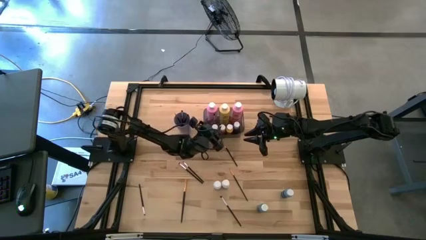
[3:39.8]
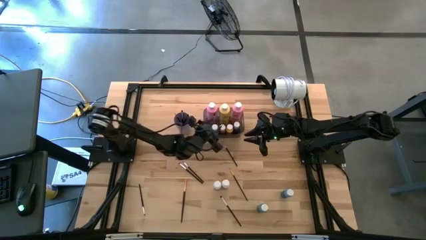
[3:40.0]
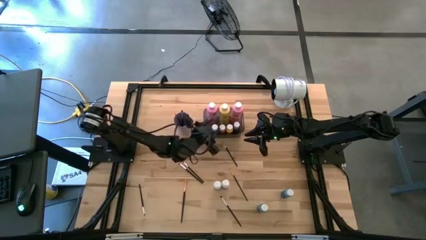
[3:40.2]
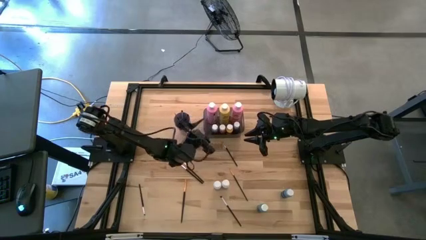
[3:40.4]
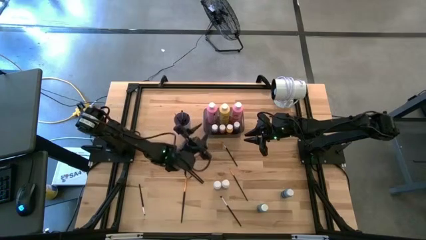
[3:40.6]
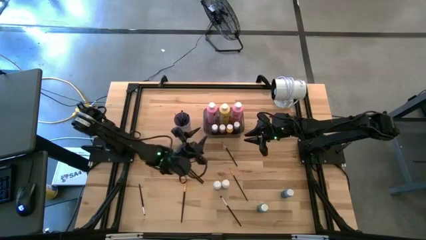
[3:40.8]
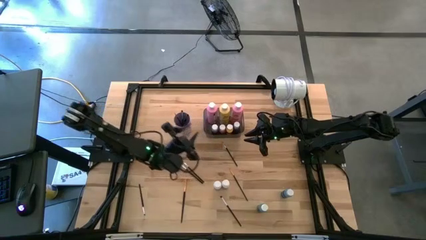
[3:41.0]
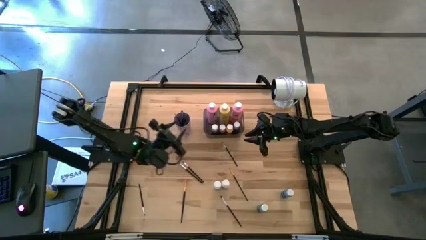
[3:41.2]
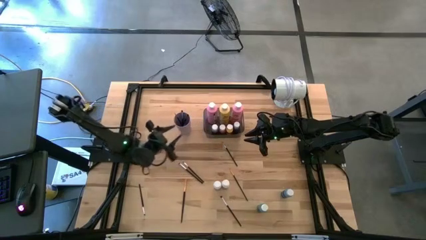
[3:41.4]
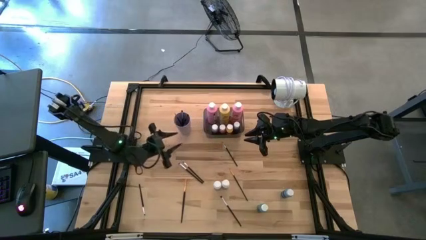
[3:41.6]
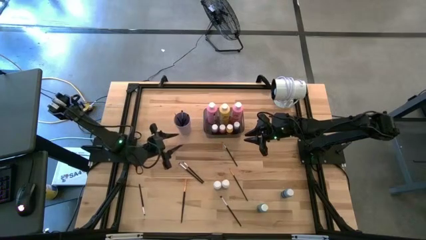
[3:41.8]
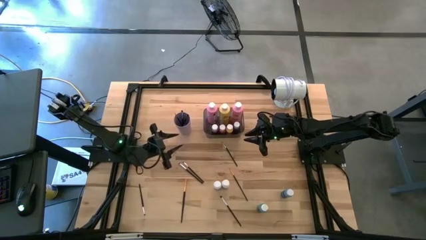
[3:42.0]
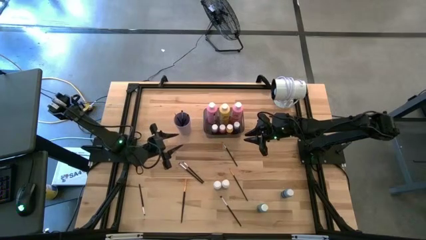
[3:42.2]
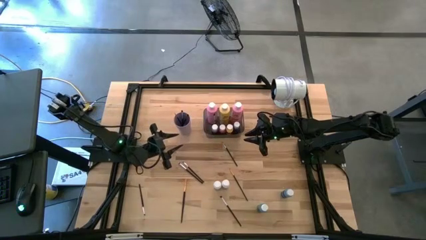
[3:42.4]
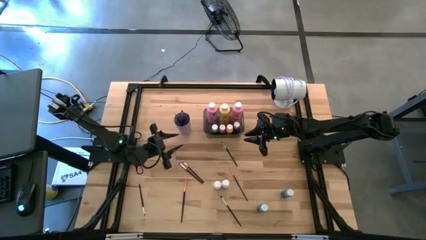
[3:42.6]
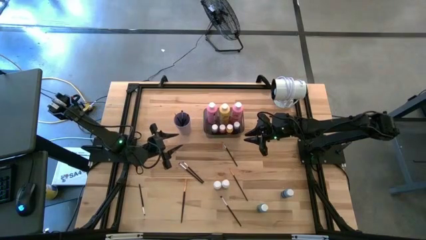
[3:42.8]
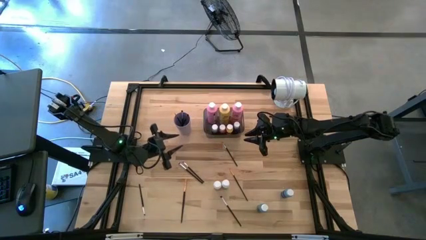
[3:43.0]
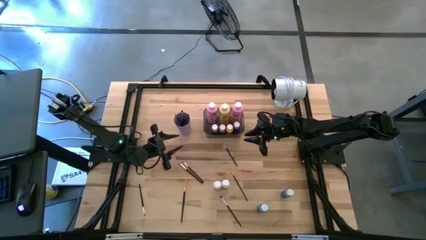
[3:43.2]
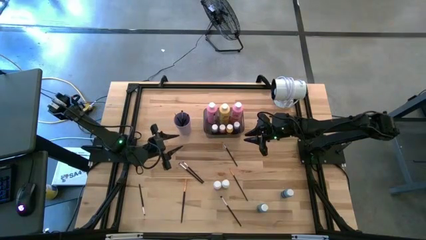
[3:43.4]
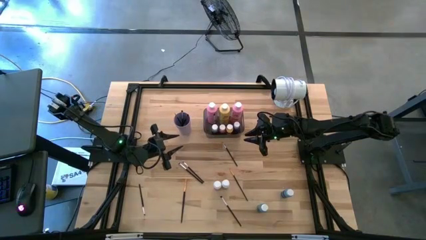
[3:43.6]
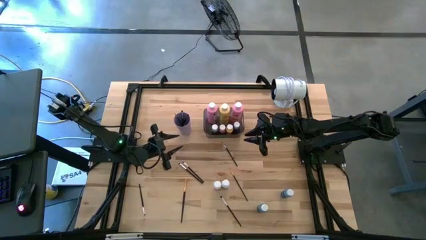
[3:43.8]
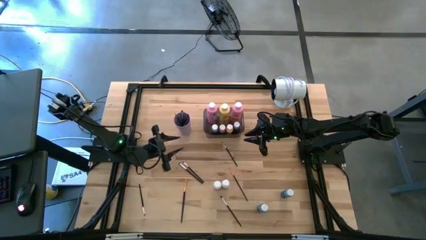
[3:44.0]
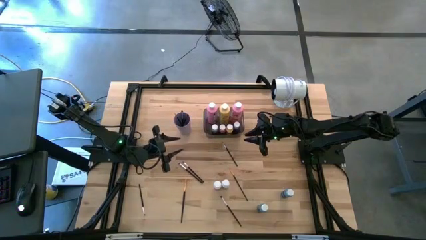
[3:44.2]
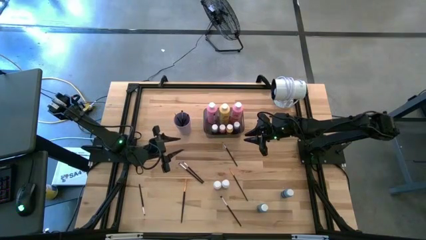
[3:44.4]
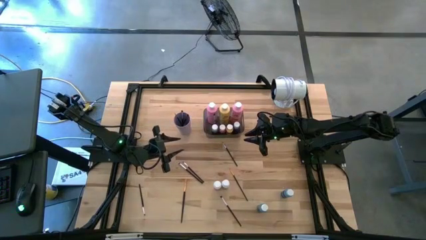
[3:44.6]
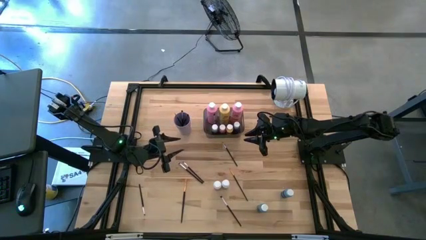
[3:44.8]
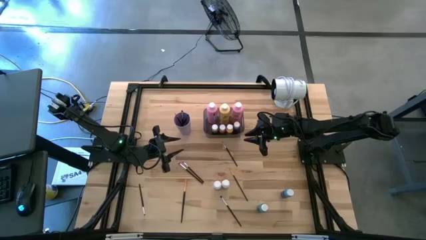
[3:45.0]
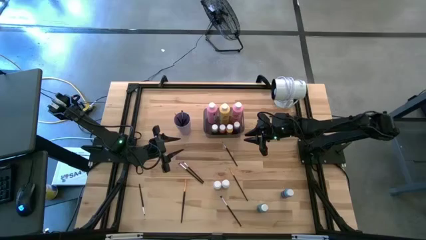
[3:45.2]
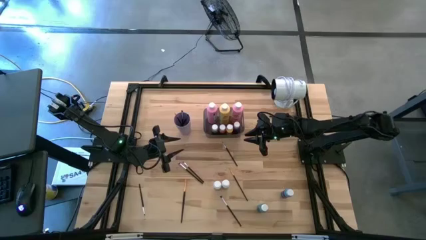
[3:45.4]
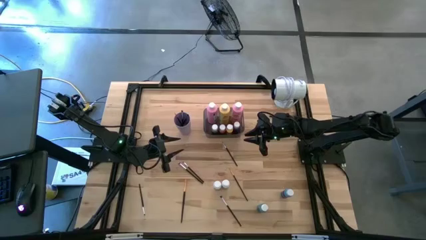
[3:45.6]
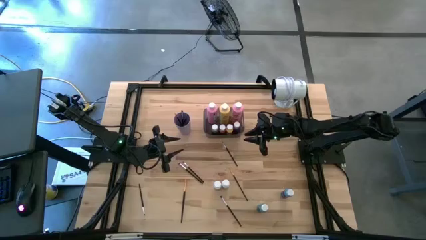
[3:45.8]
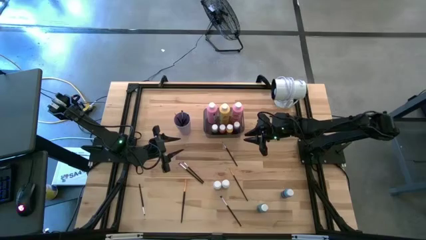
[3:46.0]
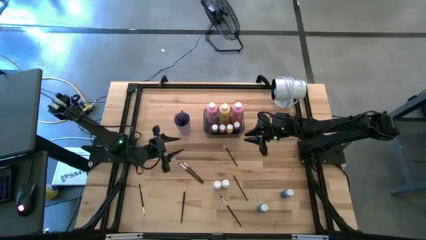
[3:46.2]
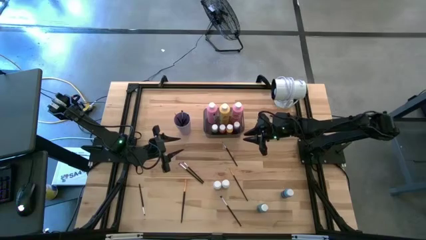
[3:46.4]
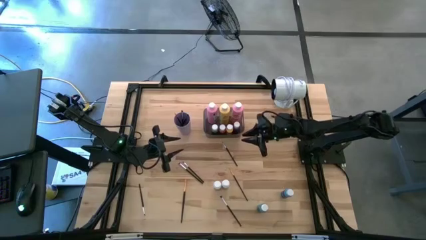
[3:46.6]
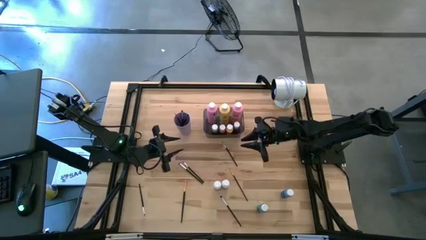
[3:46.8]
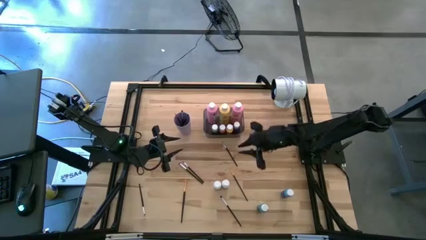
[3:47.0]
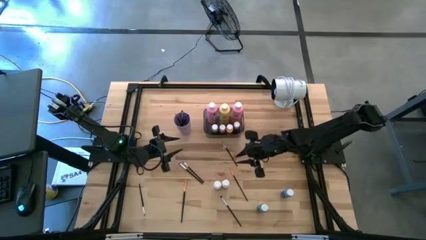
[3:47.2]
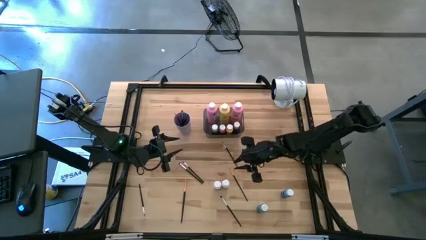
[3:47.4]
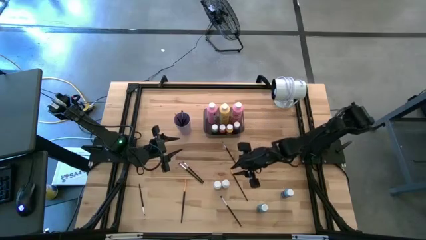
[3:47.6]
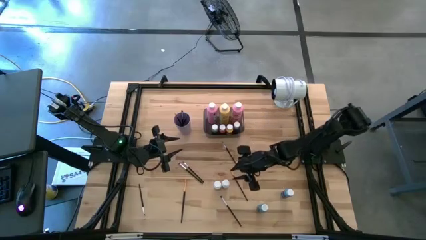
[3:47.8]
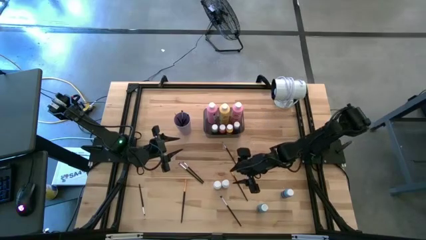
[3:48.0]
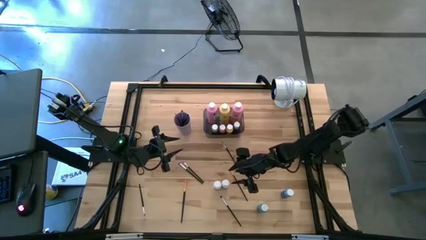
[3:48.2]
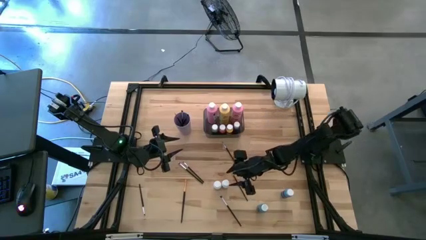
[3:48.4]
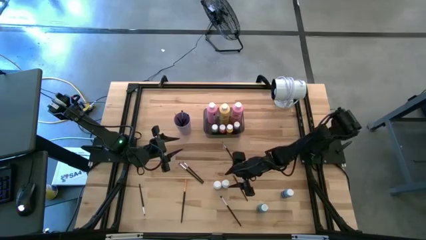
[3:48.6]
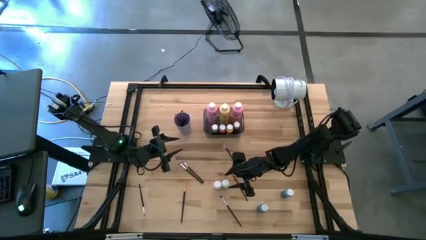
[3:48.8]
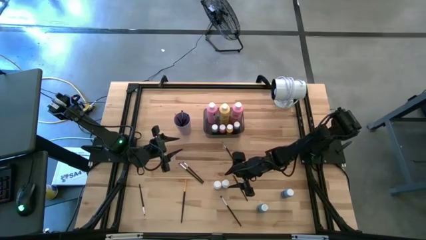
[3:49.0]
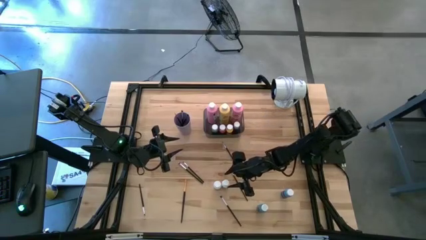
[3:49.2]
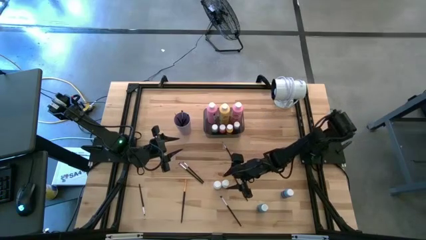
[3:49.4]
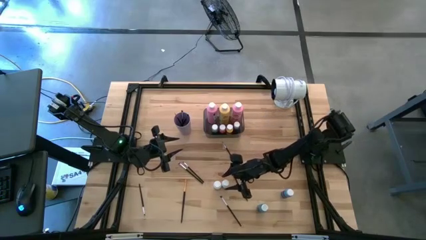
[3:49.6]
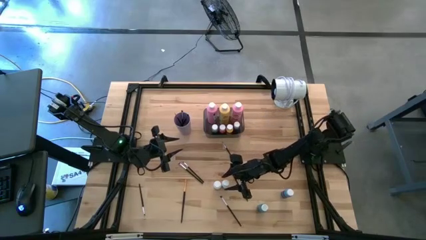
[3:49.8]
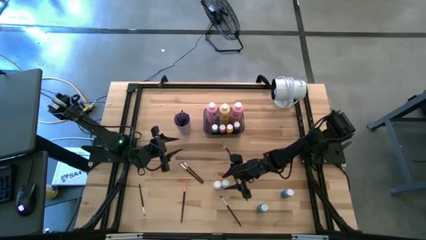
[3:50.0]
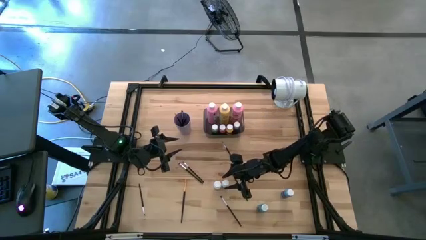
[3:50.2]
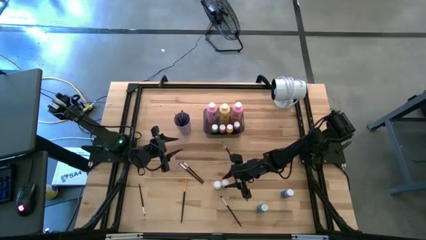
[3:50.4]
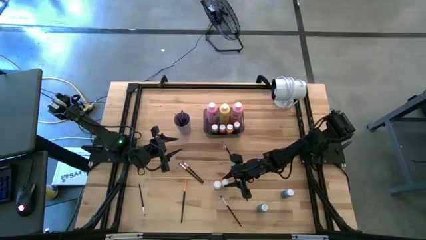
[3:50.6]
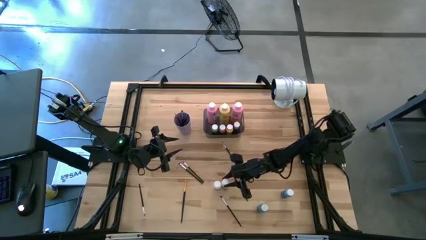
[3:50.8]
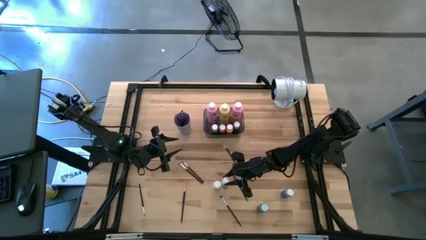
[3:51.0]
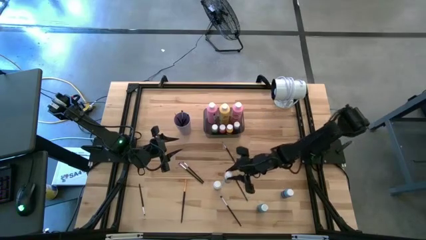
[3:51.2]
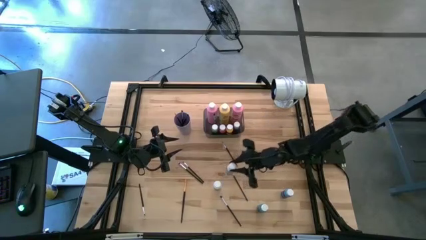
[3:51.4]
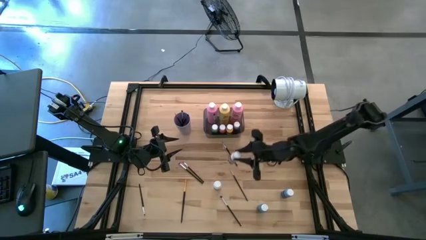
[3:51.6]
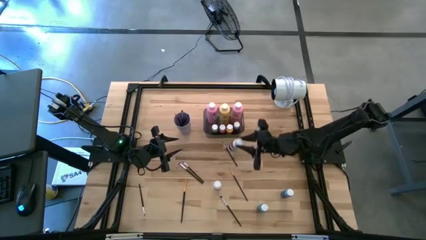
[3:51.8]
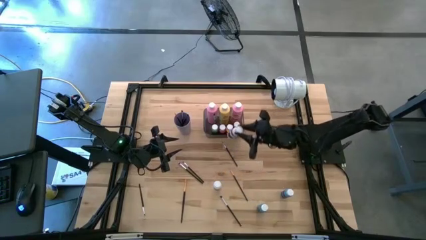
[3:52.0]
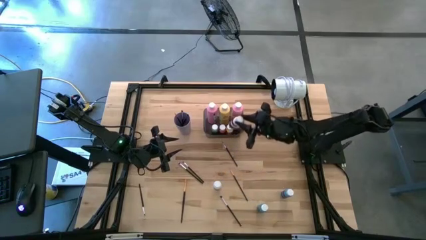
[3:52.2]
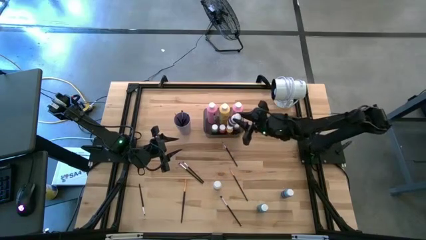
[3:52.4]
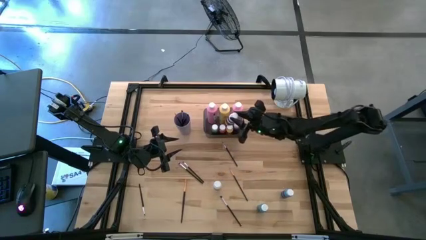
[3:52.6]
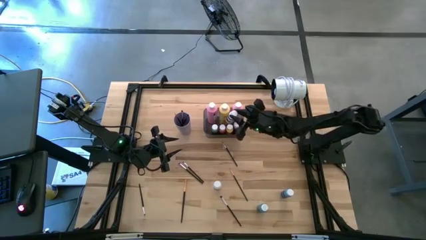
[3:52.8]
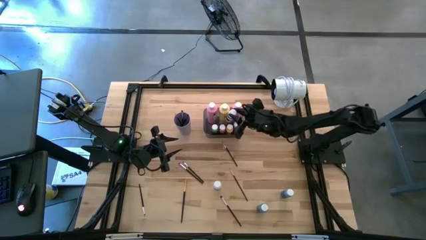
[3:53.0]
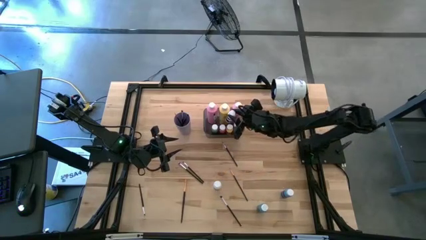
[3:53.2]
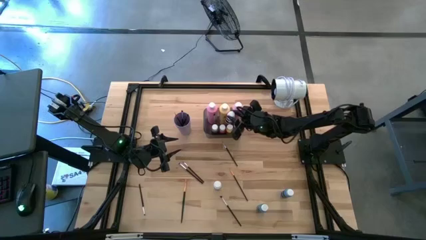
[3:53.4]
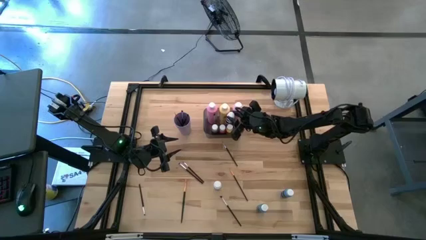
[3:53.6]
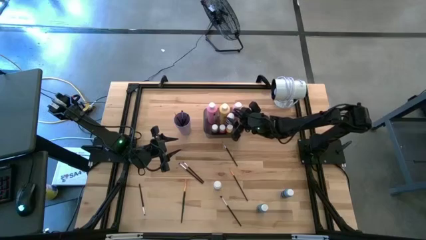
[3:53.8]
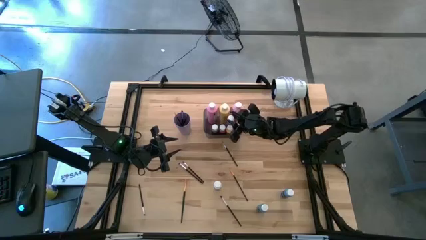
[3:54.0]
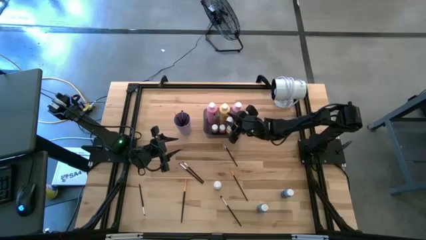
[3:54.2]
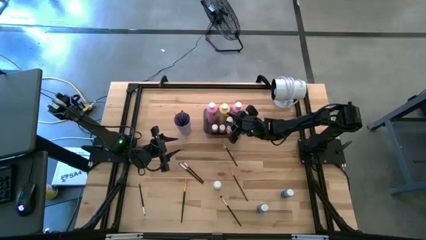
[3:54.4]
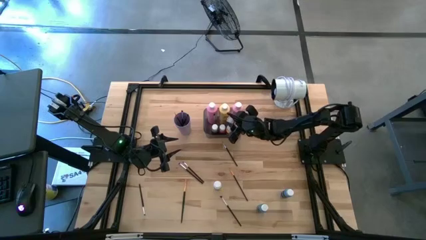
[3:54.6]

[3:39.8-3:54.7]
Task: Pick & Place Paint Supplies
Put the small white paint bottle into the gray bin

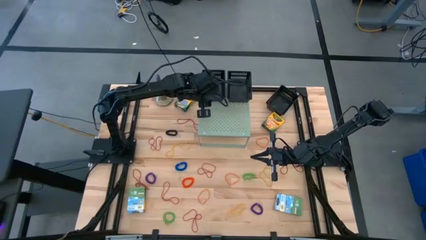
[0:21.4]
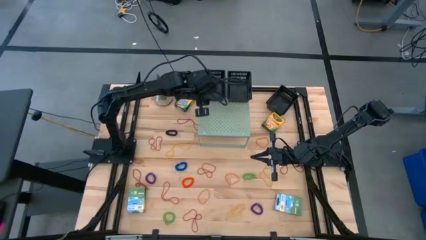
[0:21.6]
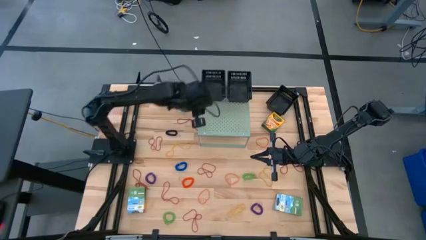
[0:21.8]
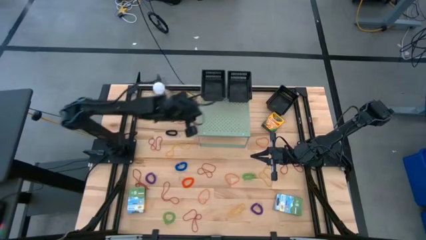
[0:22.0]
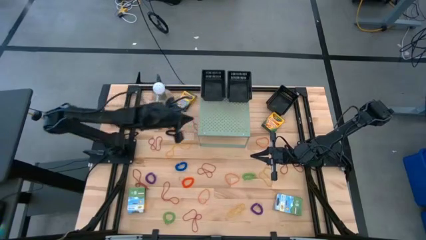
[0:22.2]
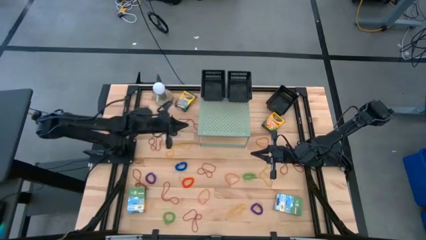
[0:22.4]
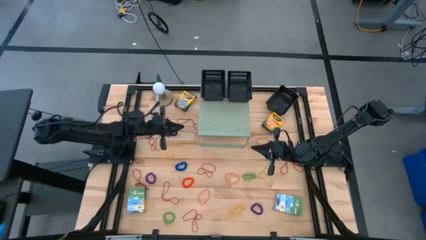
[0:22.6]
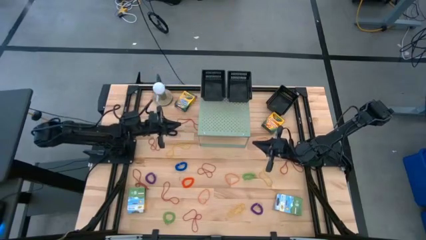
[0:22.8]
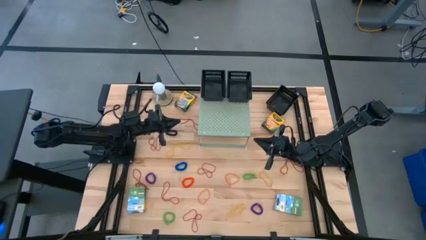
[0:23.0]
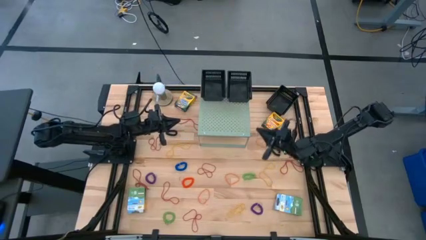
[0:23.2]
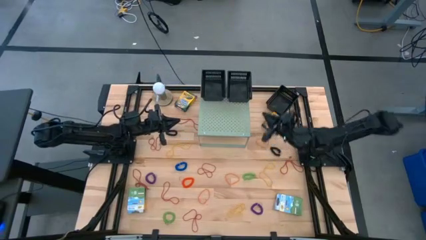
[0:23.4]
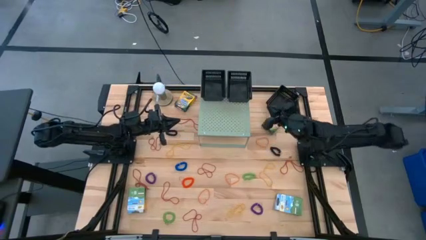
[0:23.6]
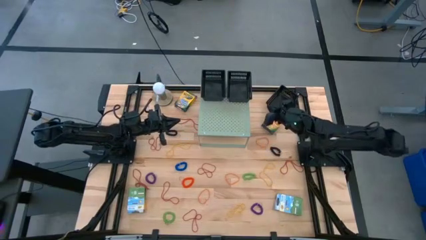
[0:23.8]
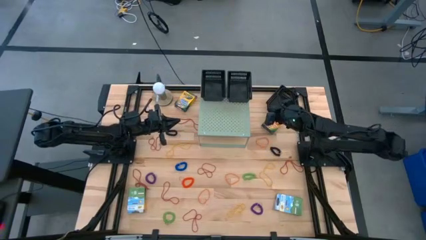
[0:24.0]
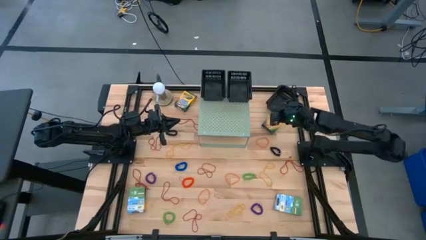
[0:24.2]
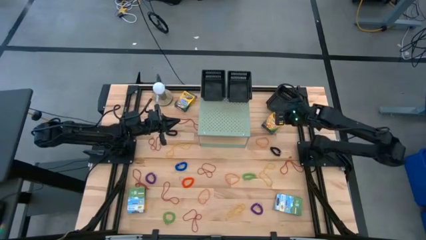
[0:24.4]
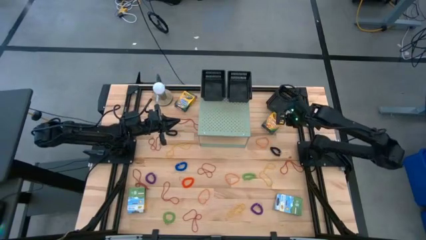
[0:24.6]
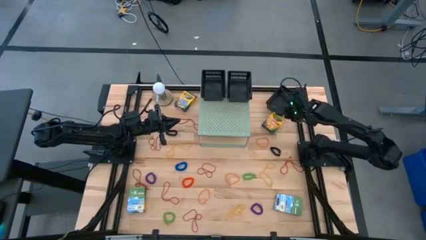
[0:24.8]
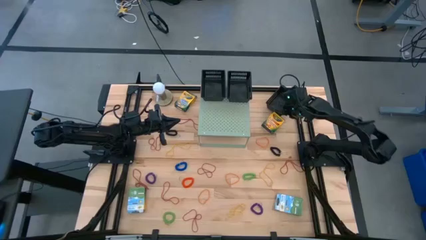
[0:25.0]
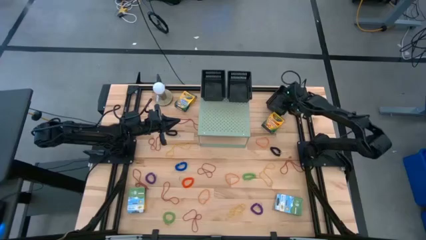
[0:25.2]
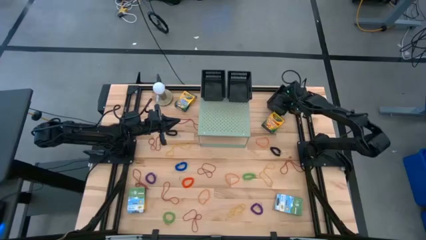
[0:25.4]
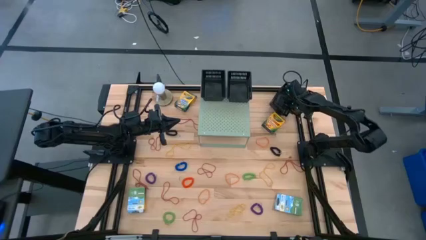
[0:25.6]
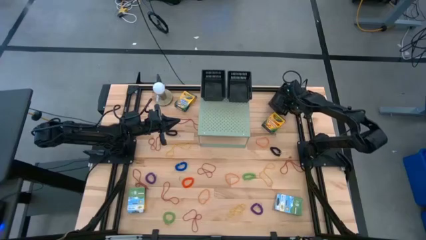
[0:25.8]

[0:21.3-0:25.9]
Task: Pick & Place Office Desk Supplies
Put the black bin on the shelf
